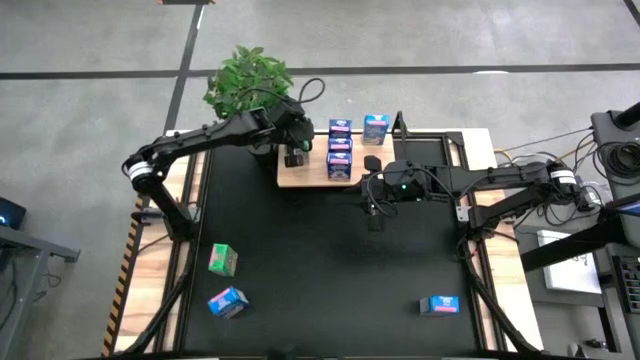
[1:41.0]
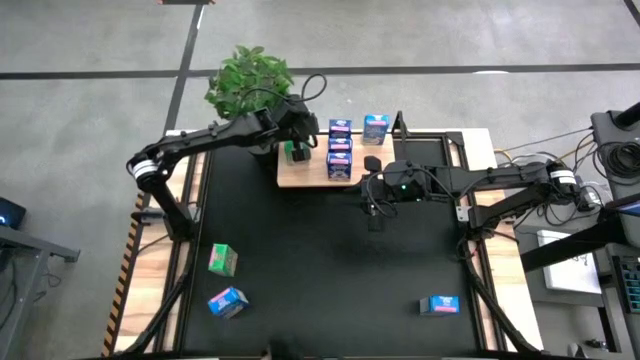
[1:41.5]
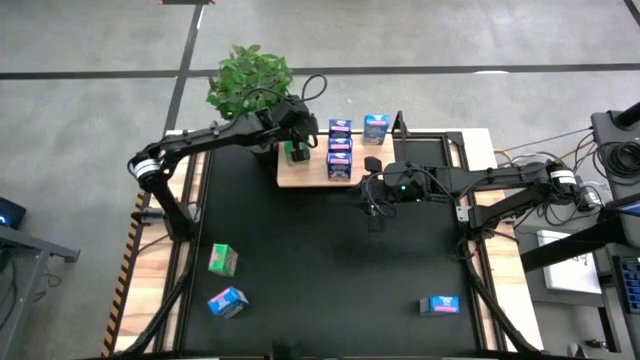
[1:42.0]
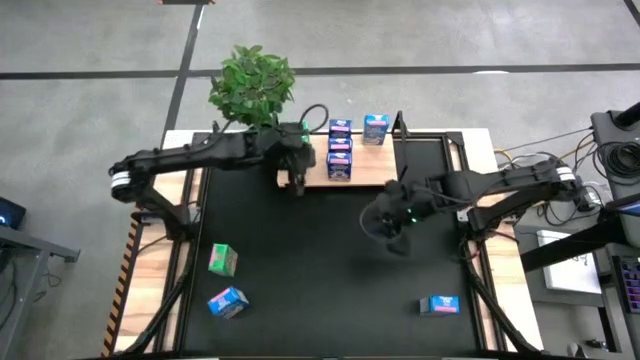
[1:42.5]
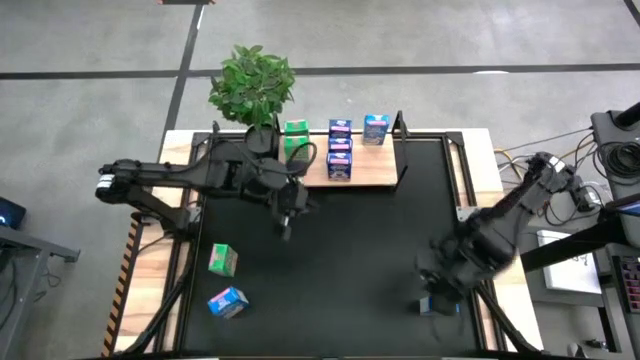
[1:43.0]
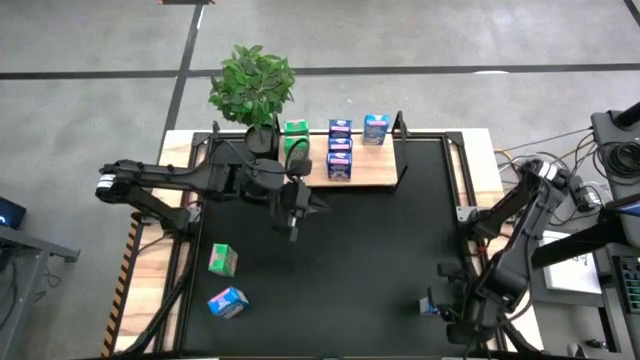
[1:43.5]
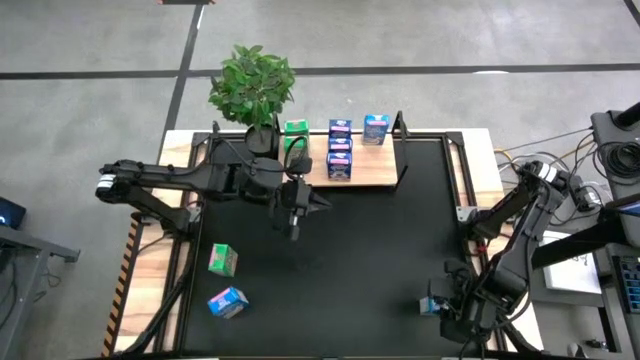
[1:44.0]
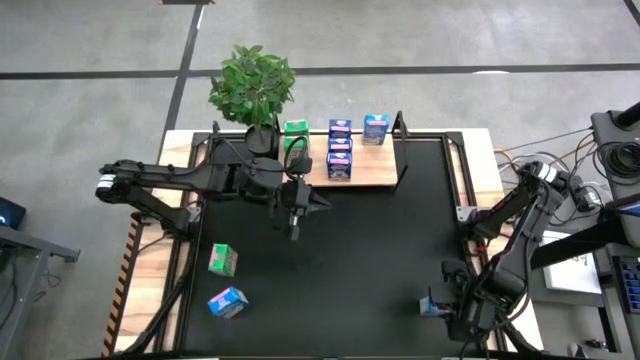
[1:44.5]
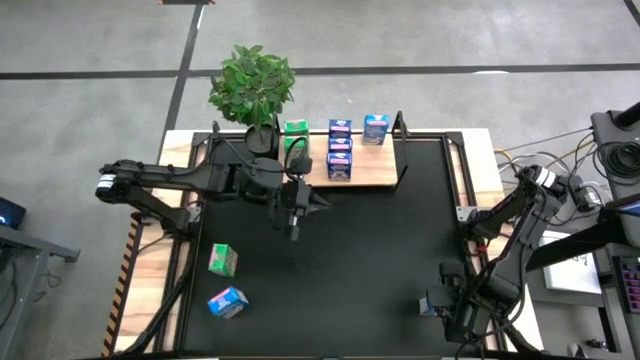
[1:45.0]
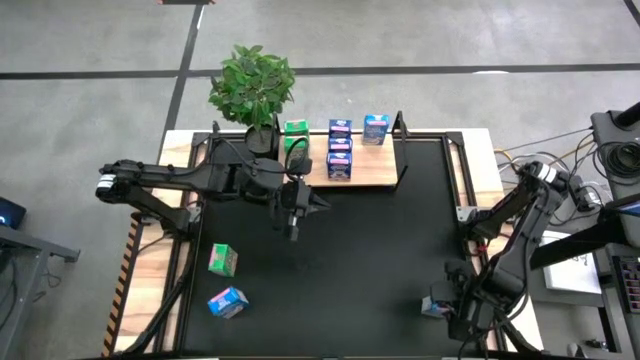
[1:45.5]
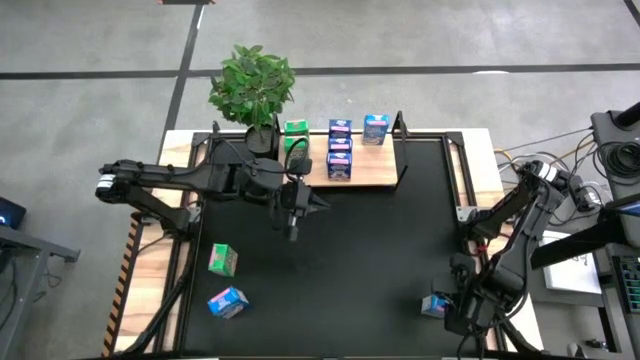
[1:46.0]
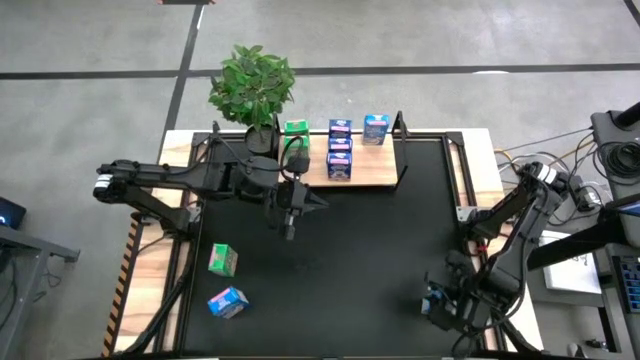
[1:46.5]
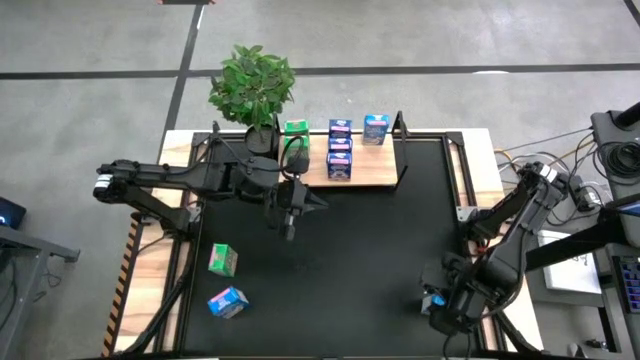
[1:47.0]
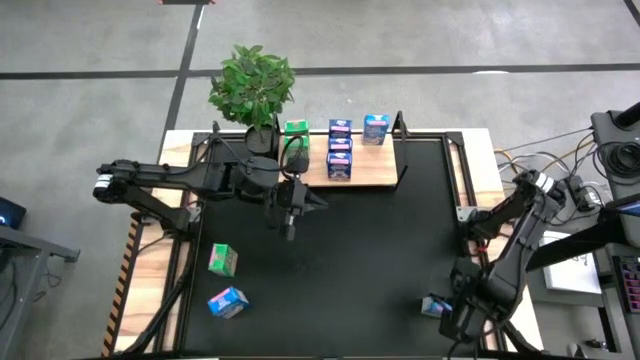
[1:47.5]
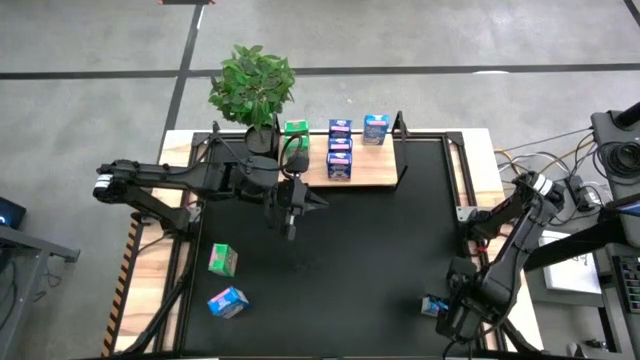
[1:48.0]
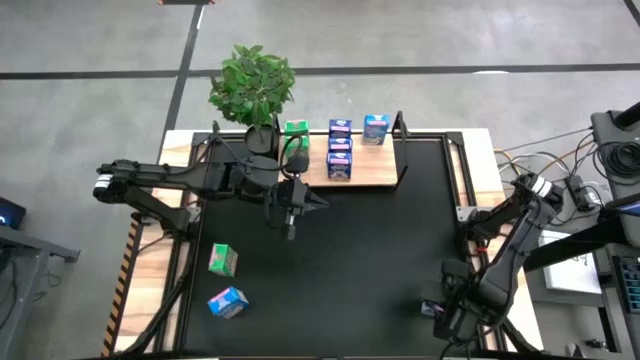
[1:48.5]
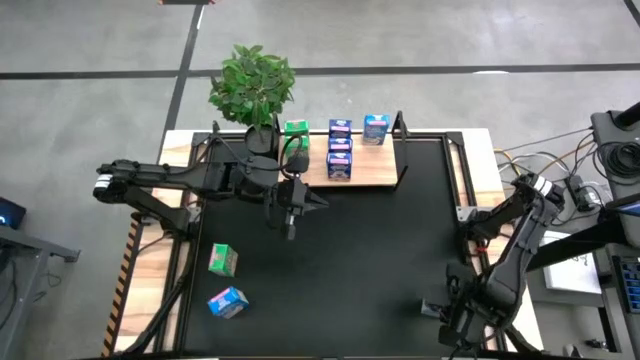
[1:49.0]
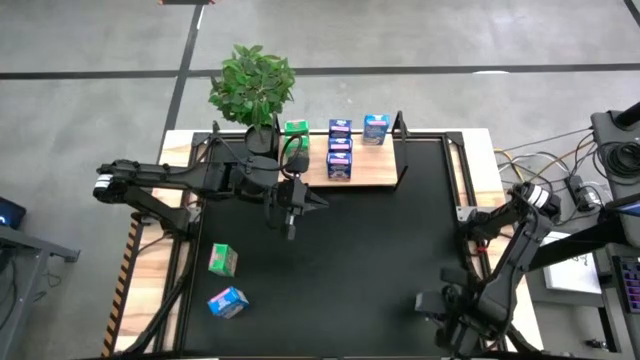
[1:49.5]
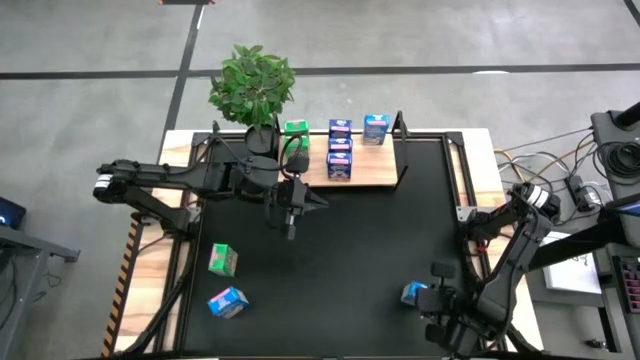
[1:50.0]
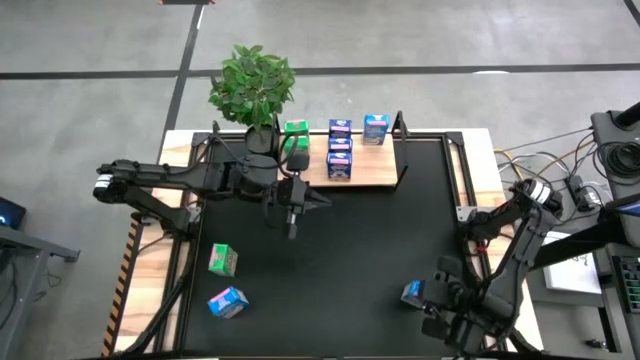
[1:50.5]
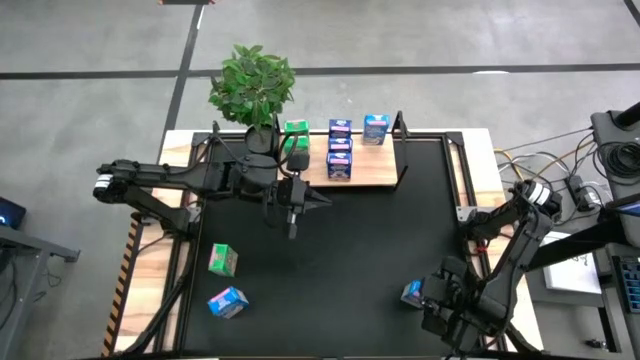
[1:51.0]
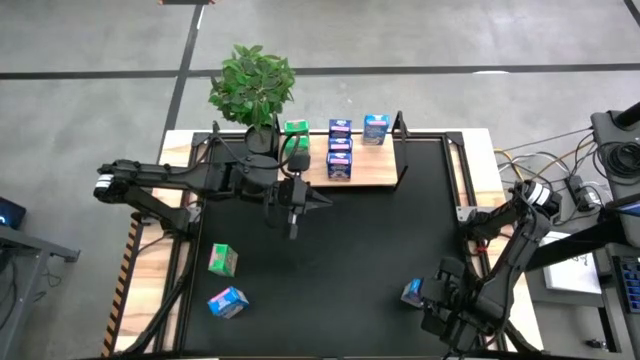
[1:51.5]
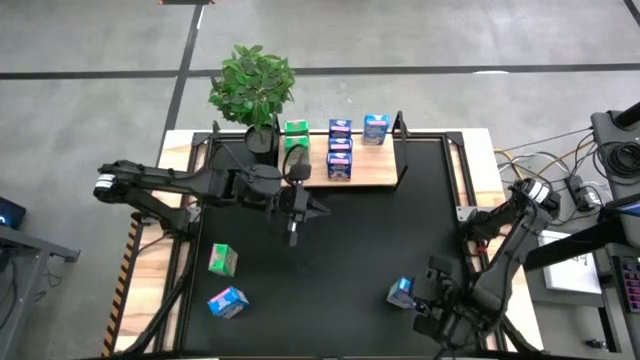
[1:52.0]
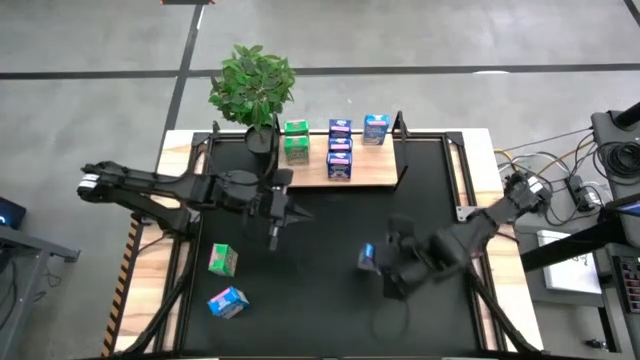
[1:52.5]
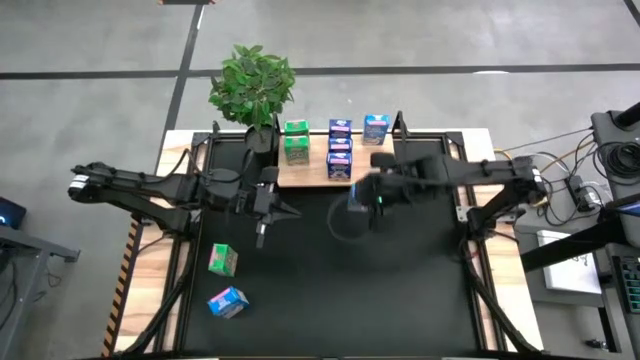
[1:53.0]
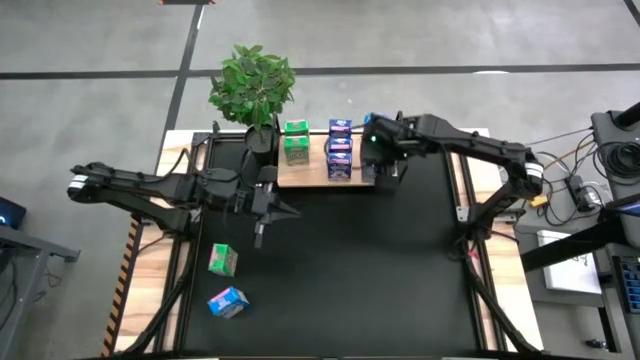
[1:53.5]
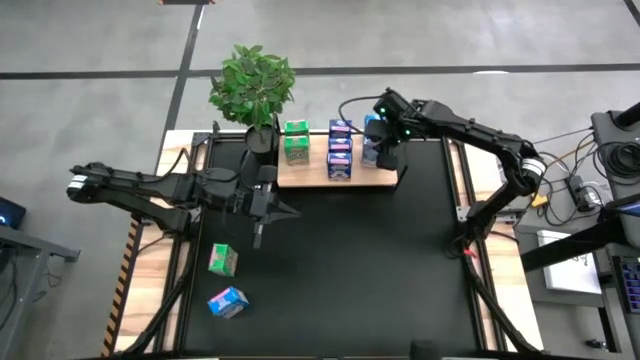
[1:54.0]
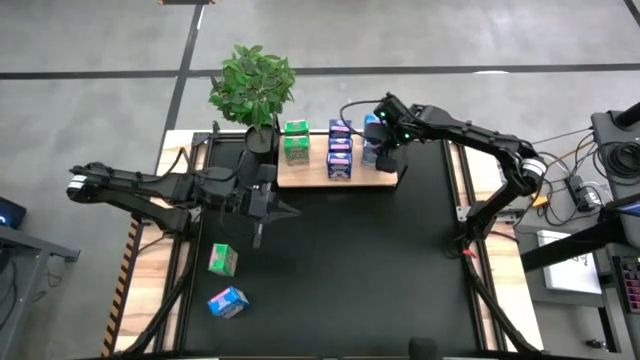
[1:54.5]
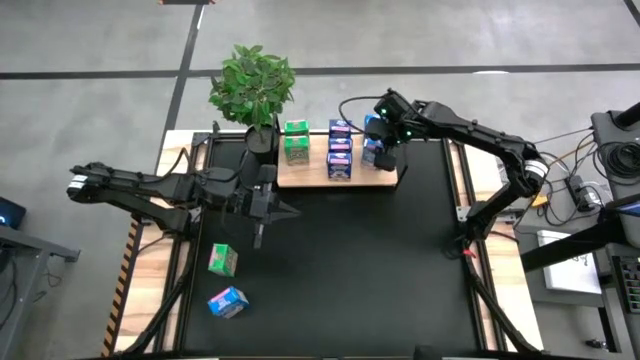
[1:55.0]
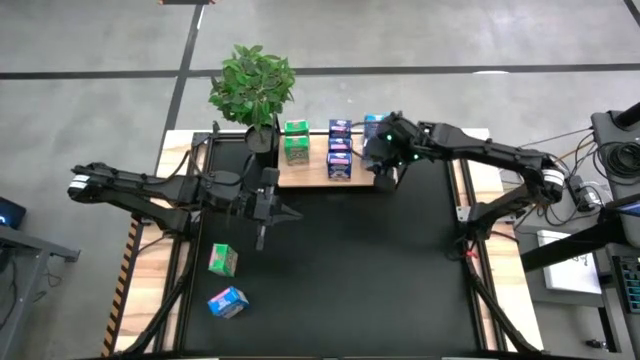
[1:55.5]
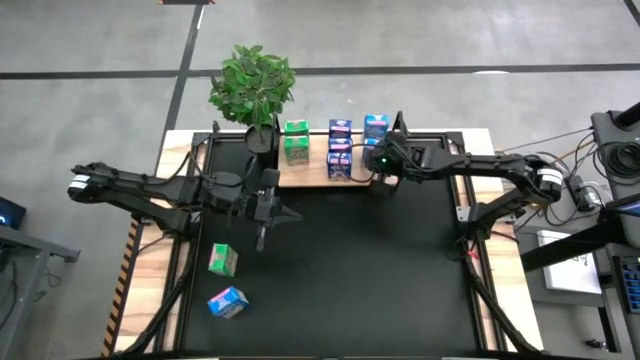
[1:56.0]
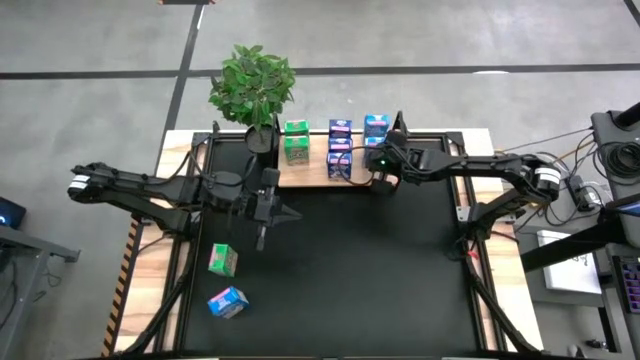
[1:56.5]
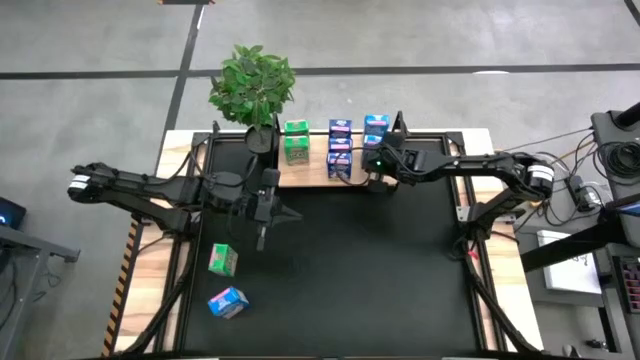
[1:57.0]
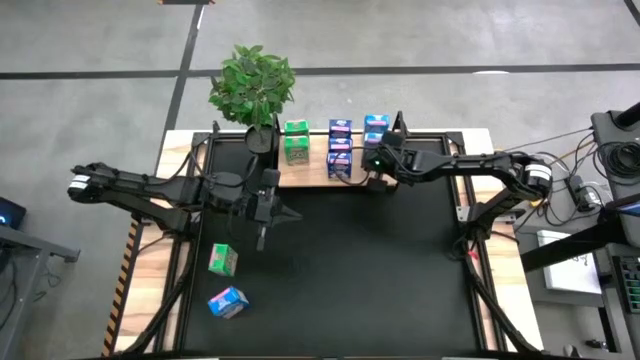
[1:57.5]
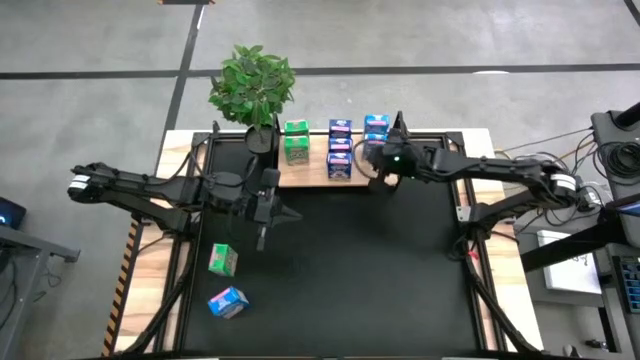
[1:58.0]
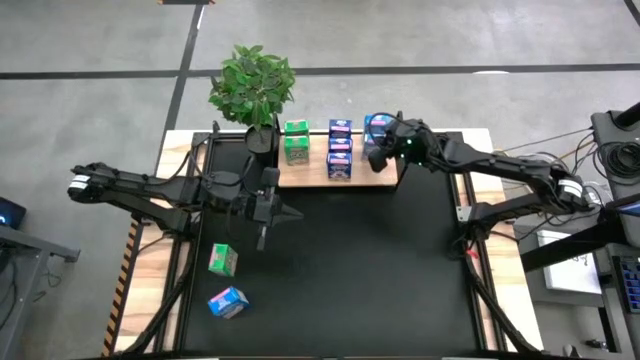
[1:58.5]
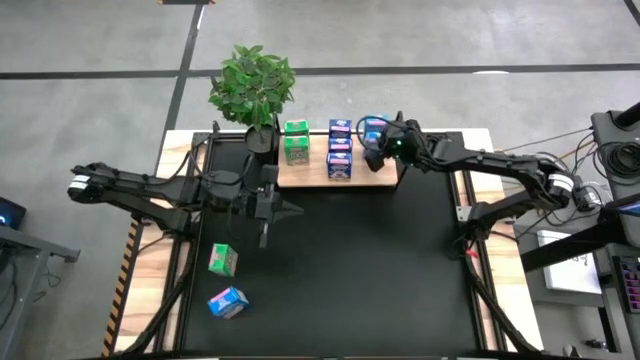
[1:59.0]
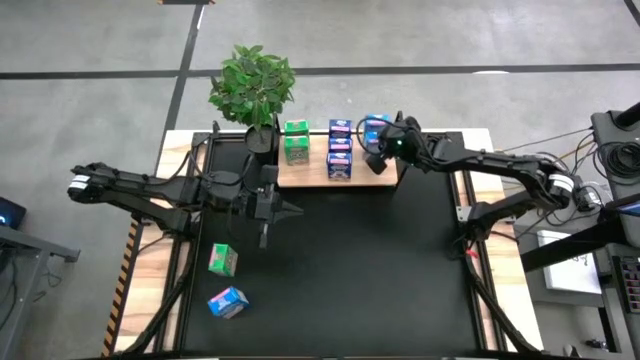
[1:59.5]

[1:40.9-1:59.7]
Task: Stack cereal on shelf
Put the right light blue cereal box aligned with the light blue cereal box on the shelf

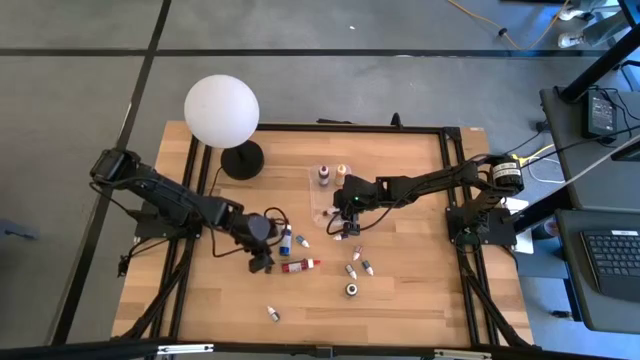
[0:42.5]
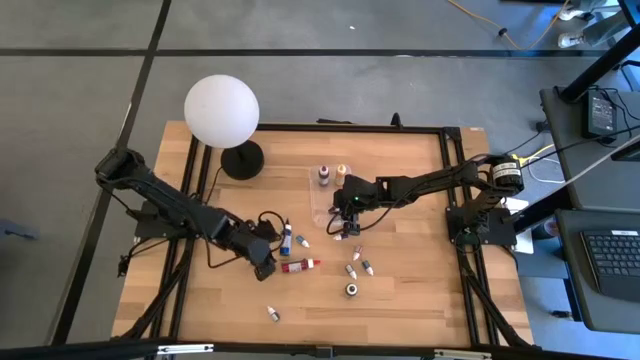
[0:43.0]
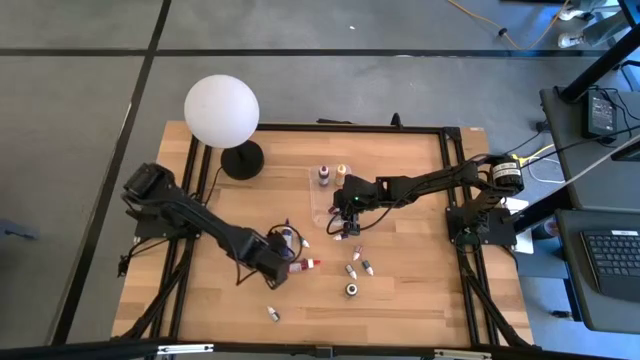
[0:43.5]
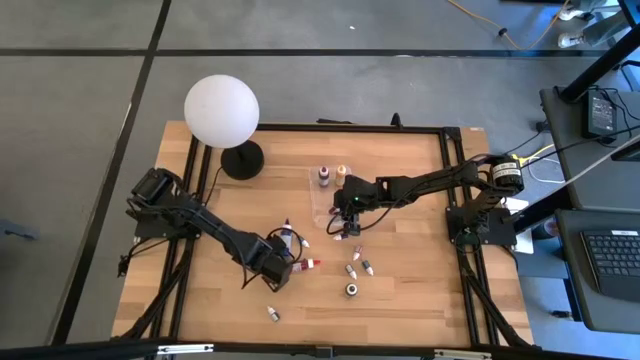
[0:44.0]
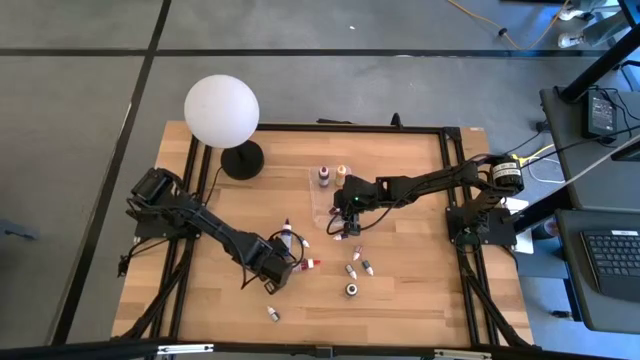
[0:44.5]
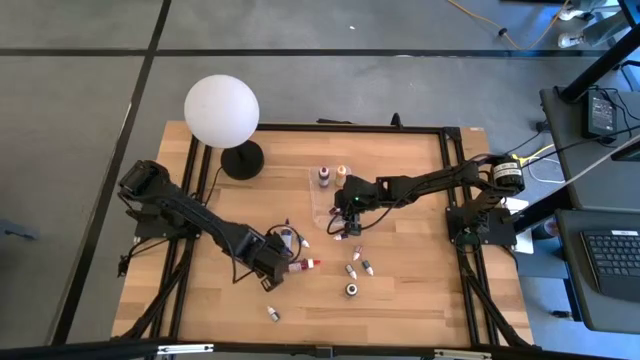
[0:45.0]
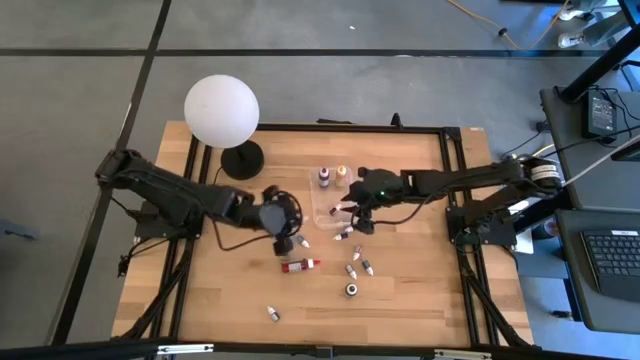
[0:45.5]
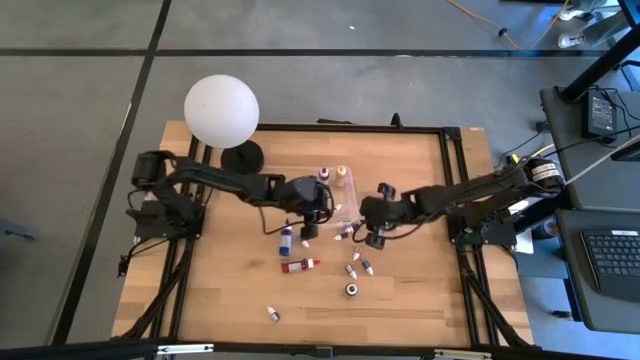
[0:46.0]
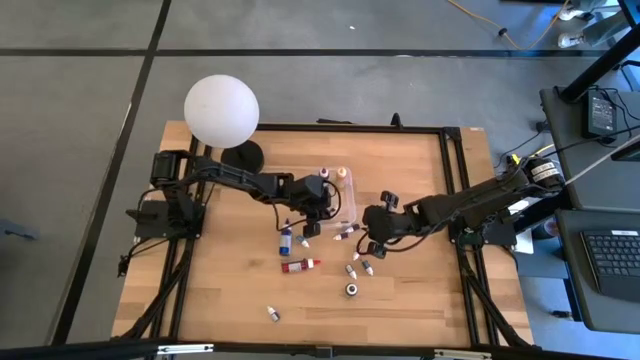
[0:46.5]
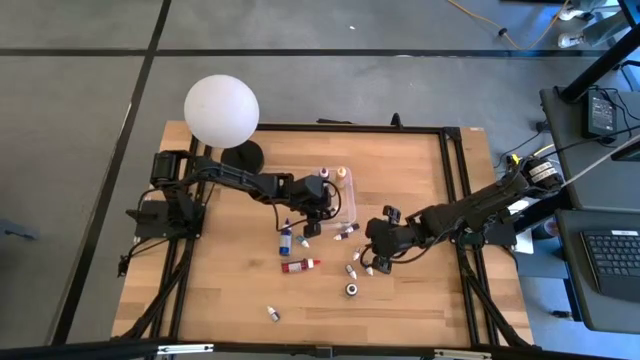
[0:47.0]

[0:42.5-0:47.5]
Task: Pick & Place food coloring
Put the small red food coloring bottle in the transparent bin
